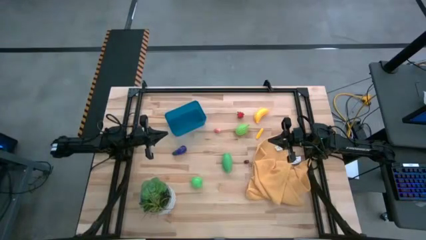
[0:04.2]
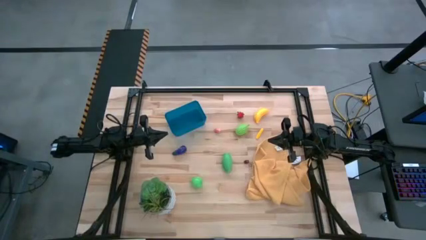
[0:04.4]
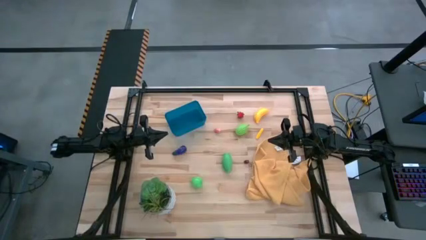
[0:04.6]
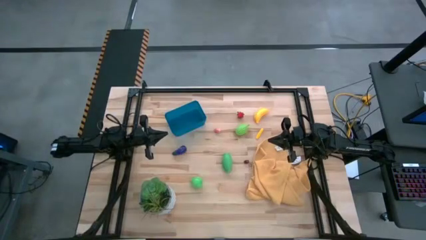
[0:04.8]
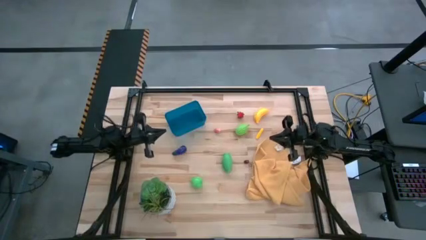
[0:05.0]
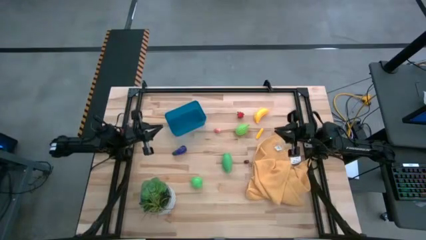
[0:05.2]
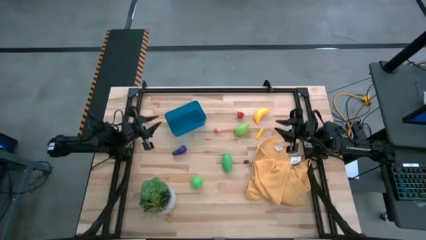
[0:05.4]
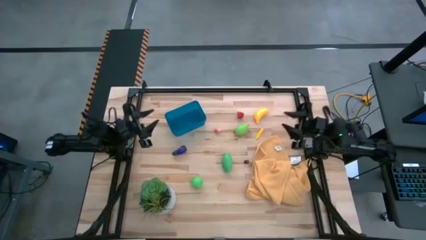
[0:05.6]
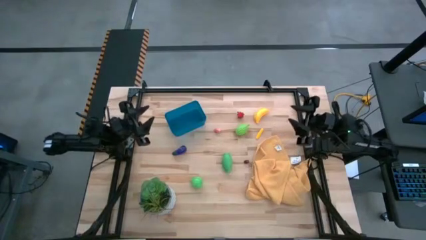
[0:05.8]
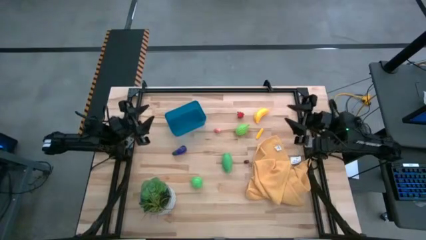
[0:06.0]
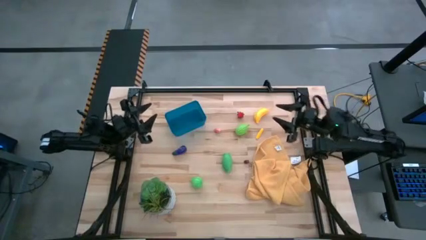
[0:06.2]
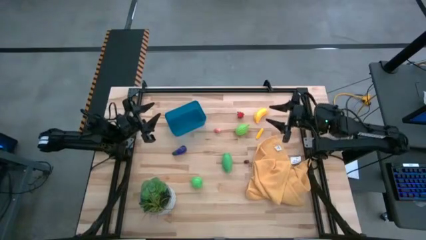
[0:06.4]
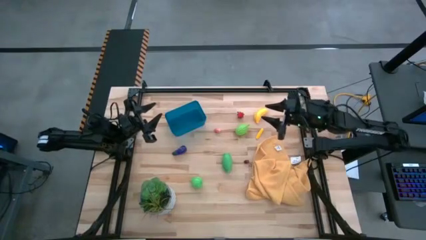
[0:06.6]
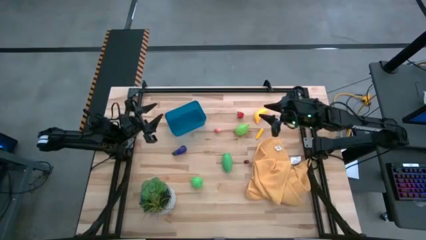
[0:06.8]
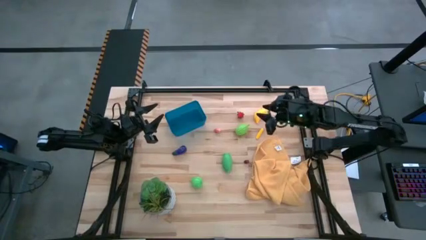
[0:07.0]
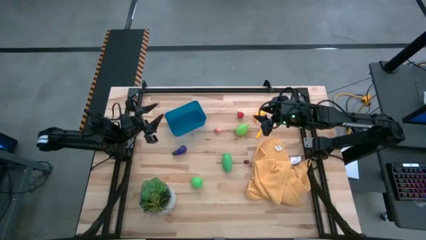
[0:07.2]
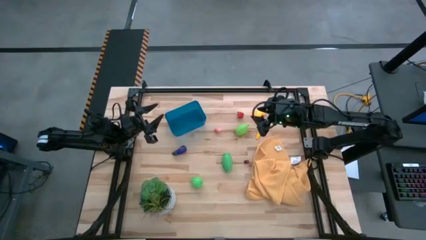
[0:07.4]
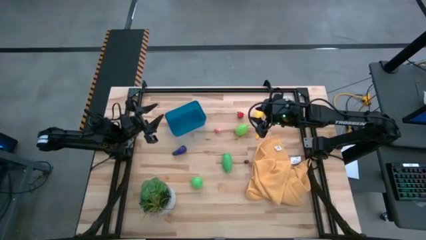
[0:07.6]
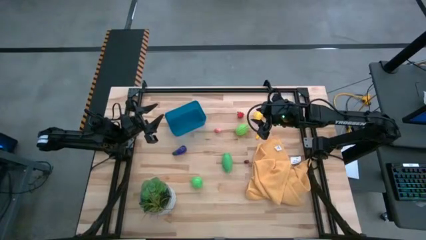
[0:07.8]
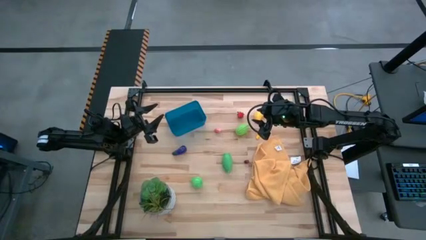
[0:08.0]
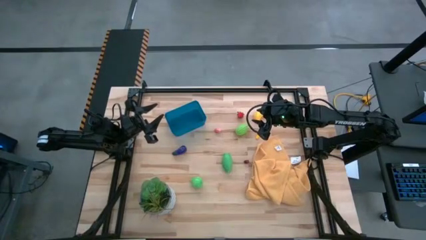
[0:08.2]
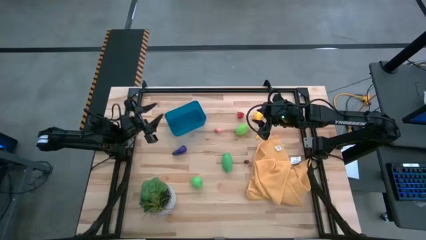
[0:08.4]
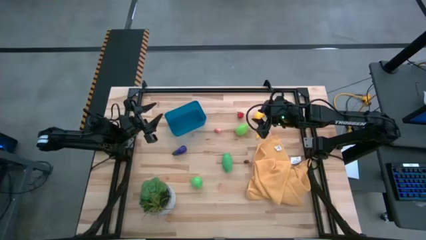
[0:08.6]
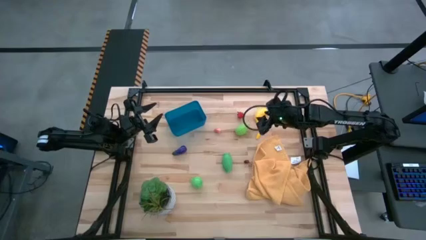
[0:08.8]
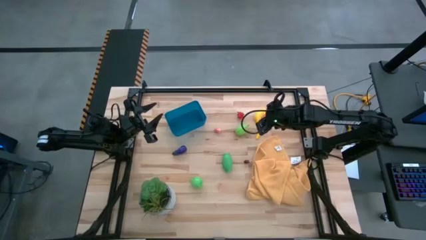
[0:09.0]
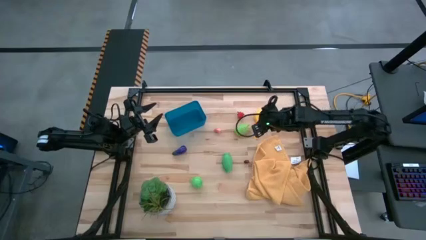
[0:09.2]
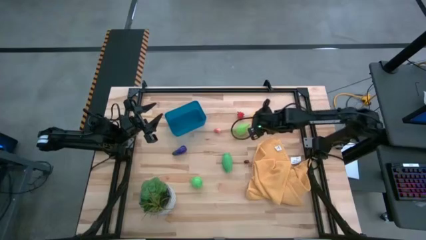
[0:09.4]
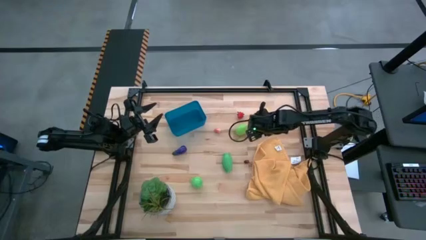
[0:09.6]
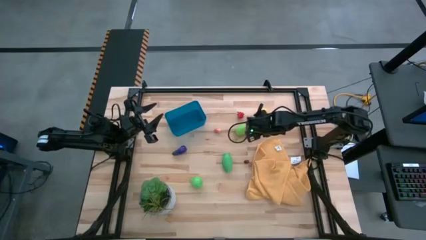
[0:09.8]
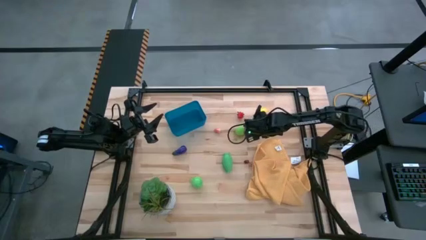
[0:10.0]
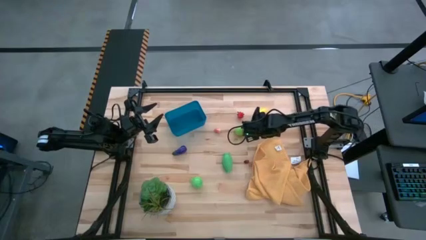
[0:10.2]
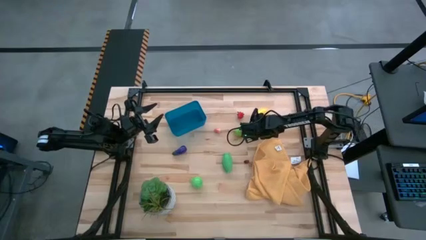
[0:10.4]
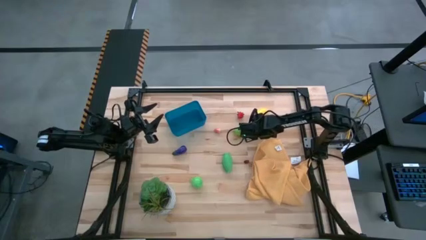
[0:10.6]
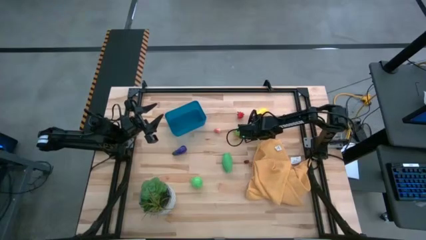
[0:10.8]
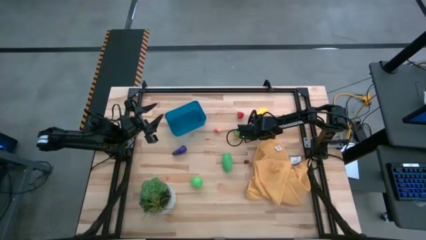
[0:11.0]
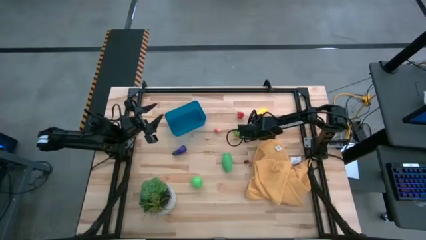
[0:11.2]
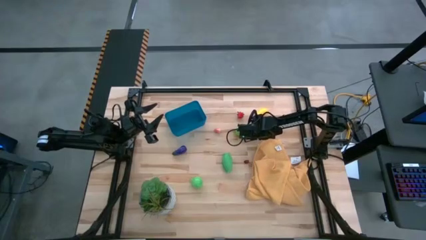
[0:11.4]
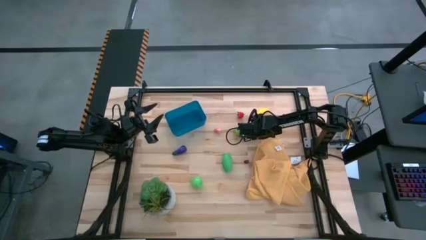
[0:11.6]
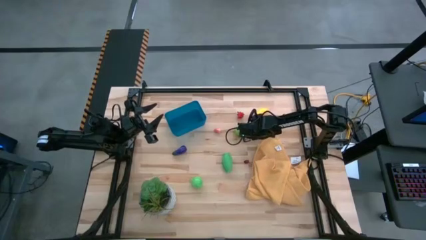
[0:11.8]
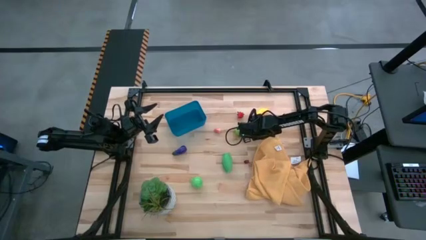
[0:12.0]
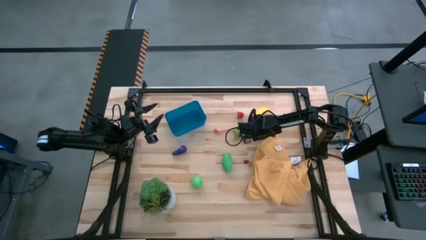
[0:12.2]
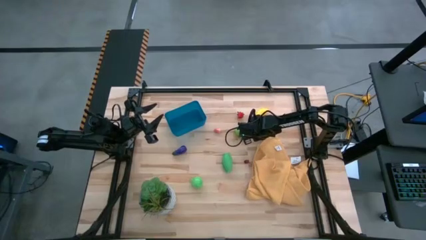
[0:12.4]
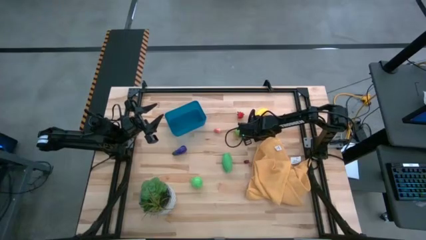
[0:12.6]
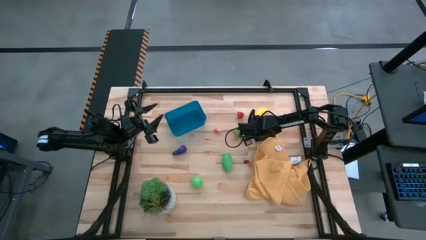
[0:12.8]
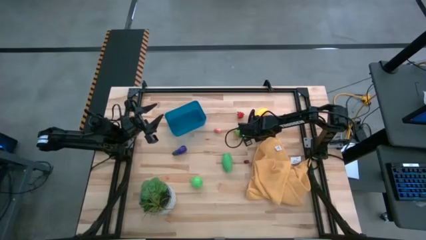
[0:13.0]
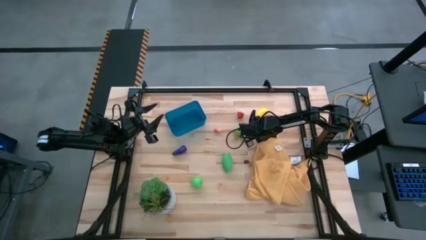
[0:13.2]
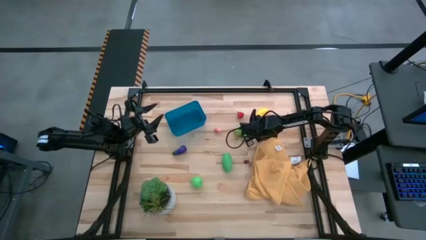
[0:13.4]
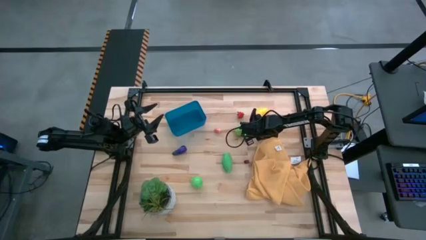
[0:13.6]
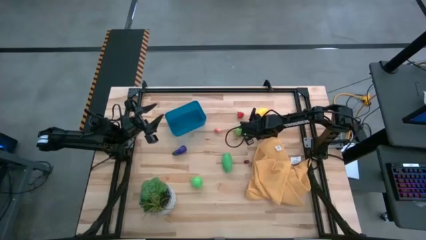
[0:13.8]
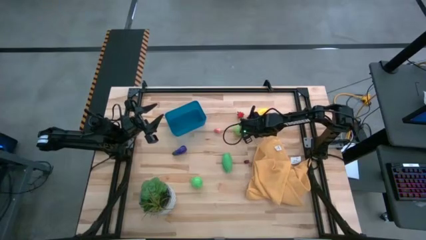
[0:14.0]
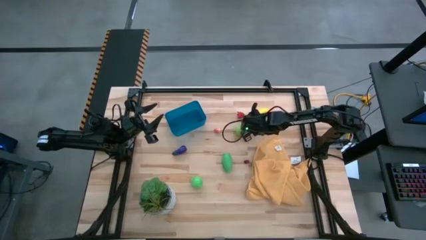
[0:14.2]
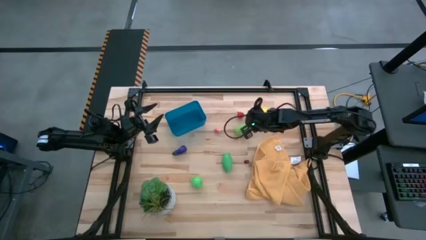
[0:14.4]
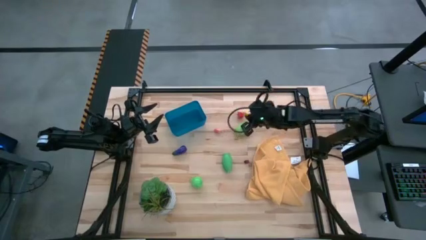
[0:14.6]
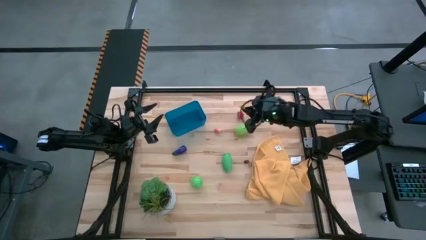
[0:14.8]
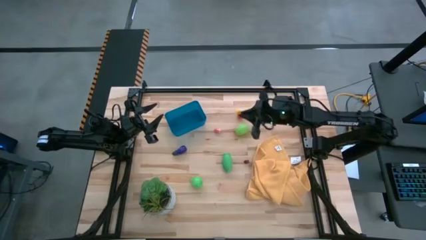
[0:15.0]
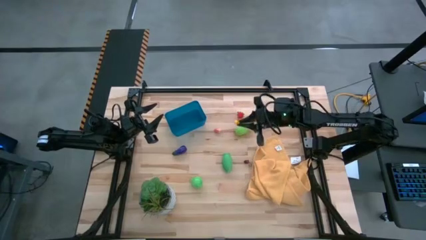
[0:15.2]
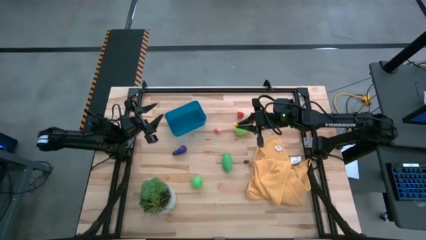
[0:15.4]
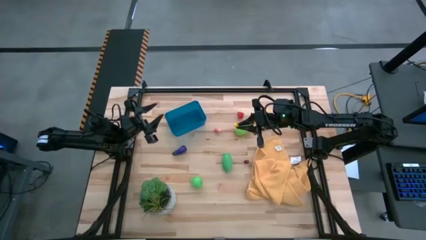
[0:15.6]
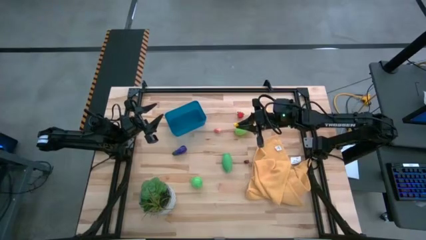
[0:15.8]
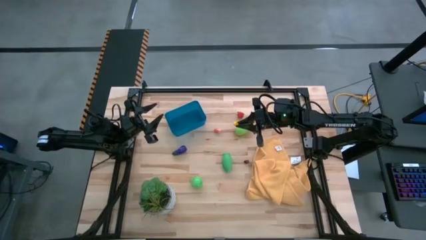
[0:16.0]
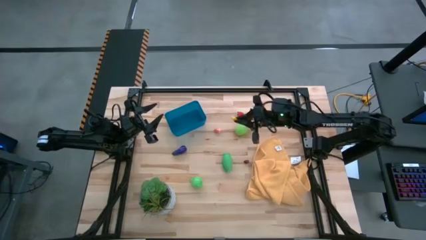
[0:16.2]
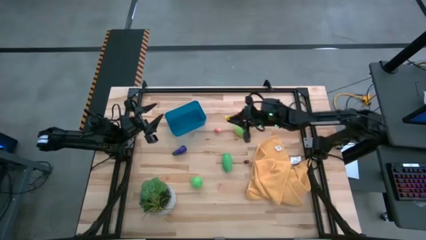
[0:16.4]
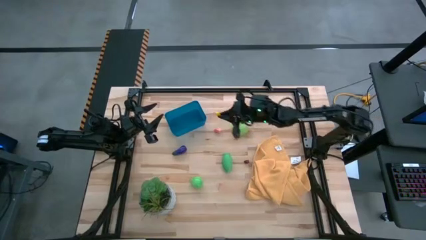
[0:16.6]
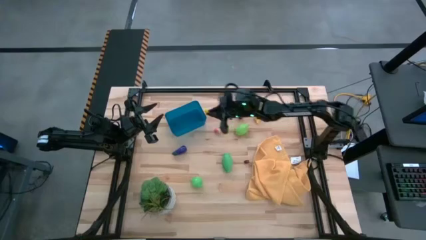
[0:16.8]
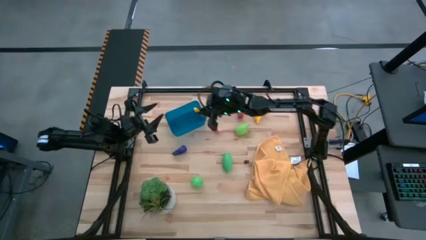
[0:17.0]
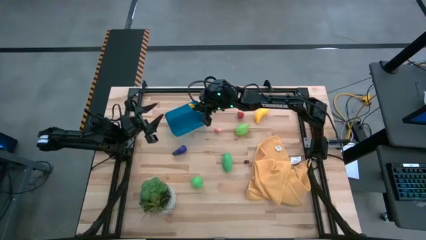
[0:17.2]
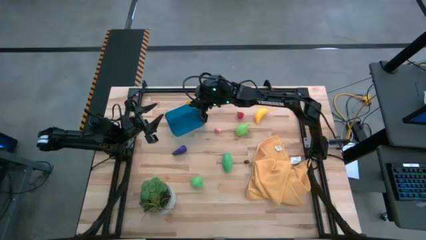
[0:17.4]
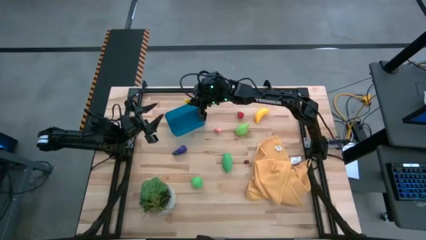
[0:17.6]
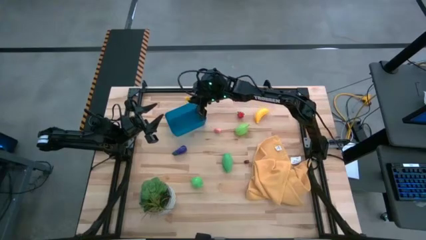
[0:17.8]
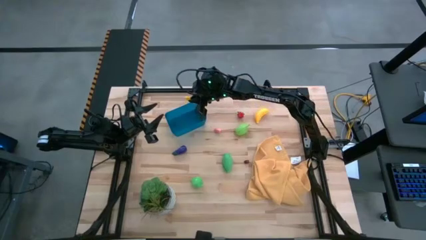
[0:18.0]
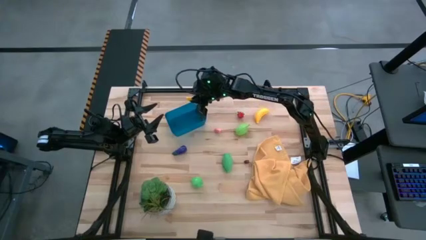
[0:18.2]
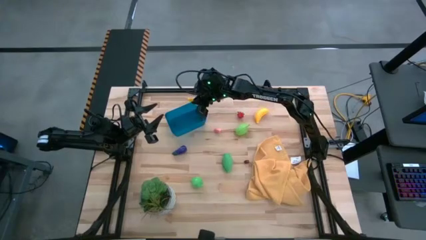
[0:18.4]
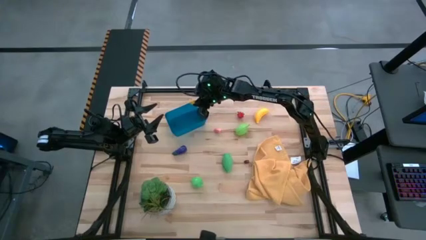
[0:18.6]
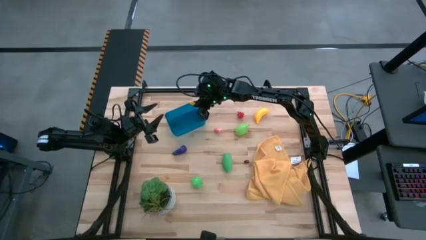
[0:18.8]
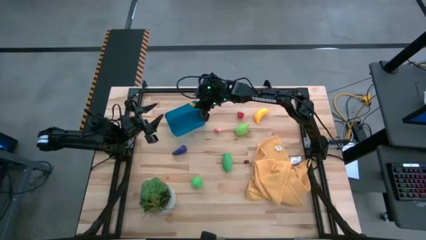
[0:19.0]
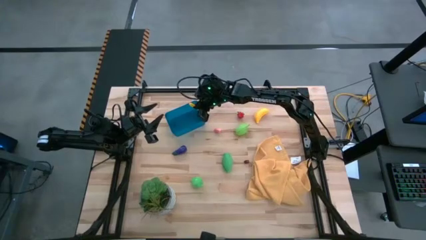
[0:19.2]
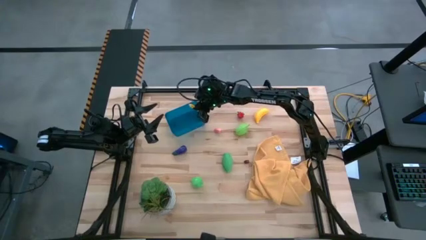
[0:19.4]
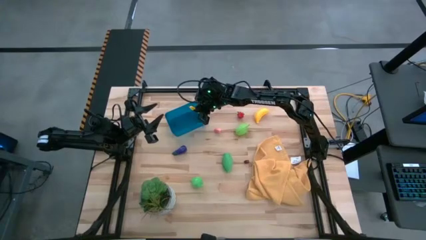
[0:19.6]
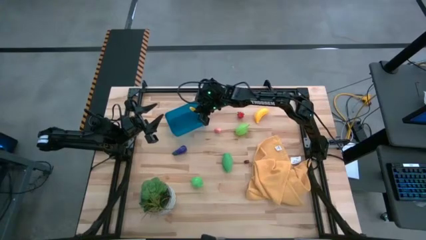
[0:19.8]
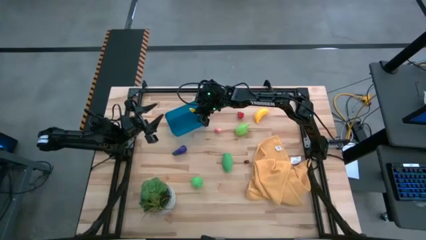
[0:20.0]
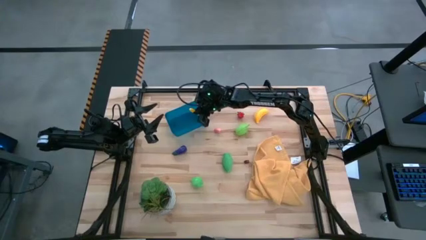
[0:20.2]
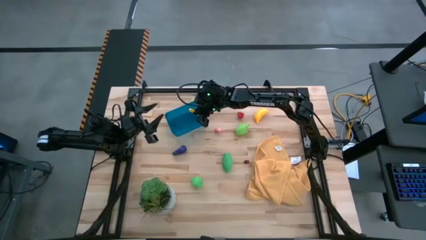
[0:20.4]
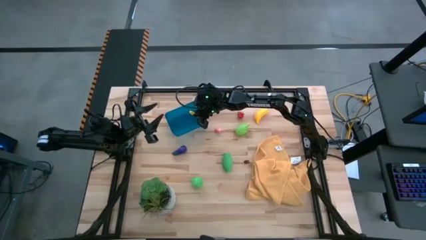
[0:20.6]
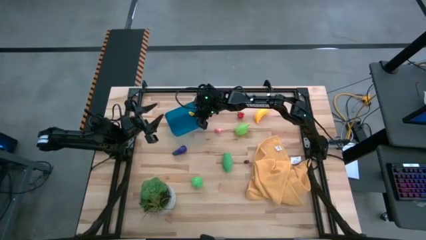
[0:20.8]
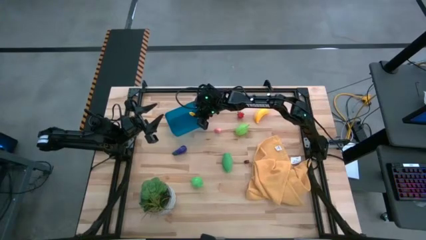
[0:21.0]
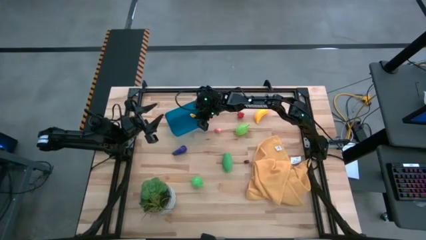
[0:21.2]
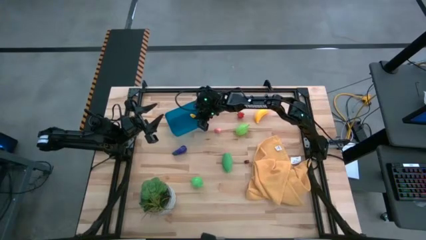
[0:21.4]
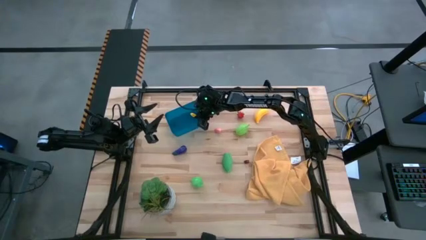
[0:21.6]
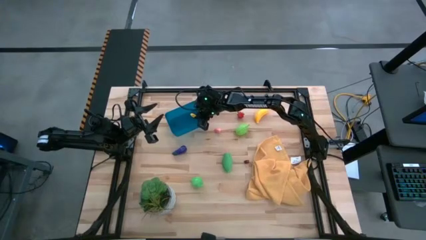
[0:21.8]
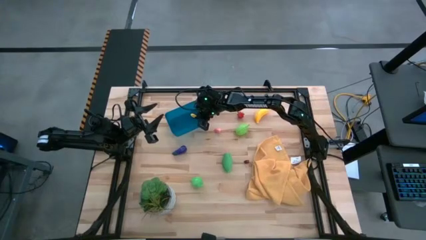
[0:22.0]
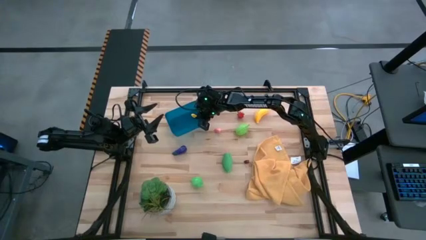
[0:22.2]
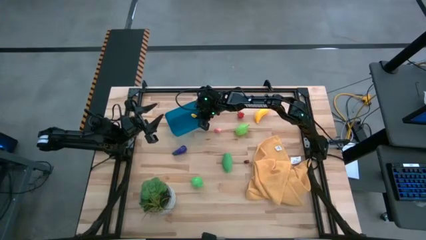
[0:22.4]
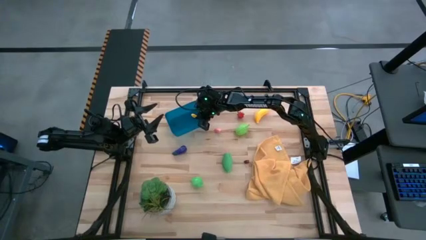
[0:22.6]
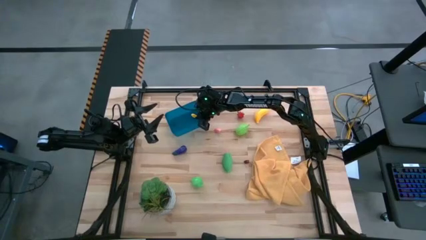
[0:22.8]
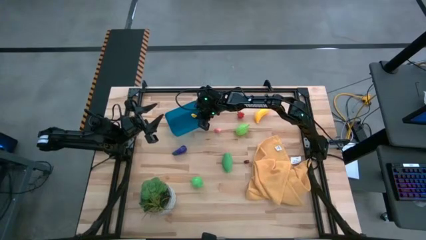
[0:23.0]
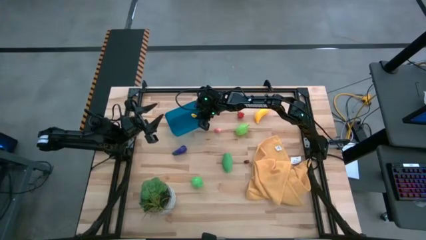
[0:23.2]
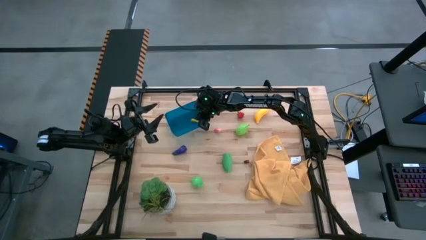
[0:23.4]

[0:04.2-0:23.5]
Task: Pick and placing Produce into tupperware
Put the small corn into the blue bin
